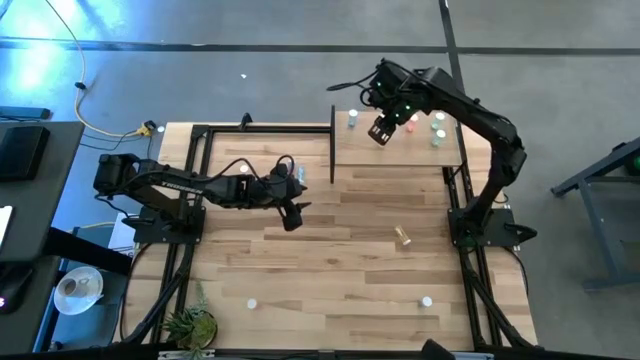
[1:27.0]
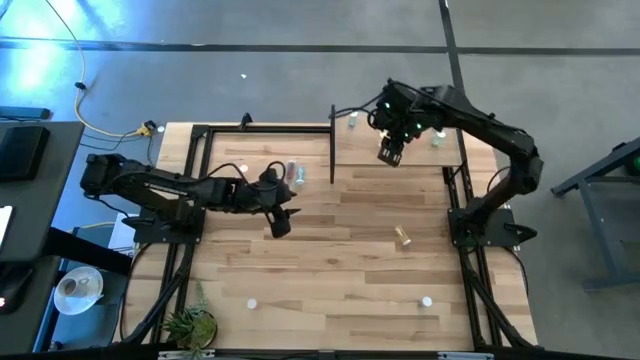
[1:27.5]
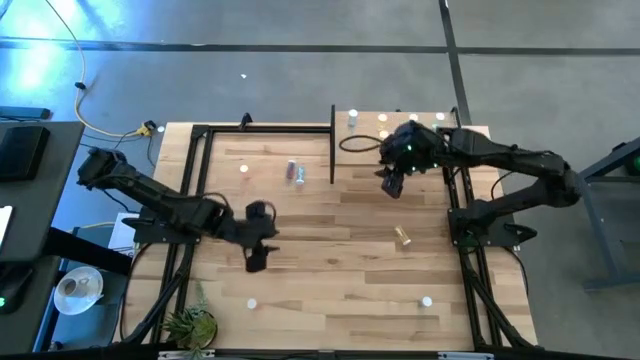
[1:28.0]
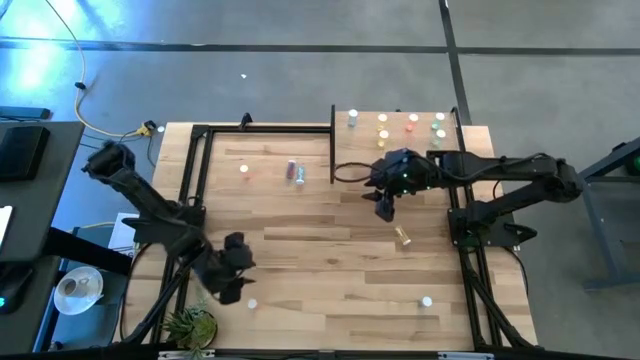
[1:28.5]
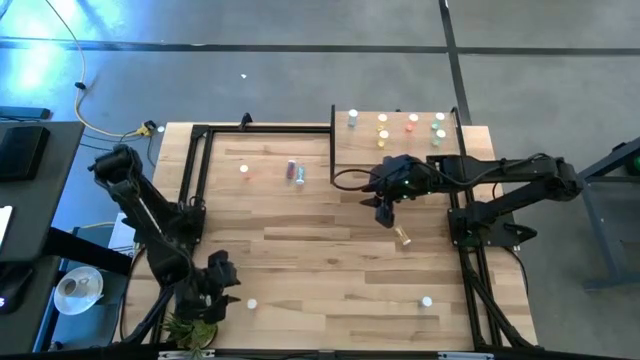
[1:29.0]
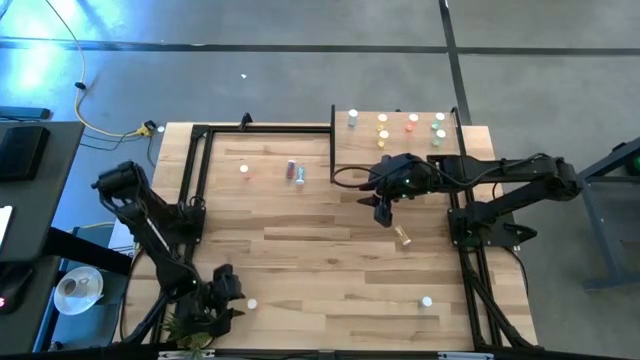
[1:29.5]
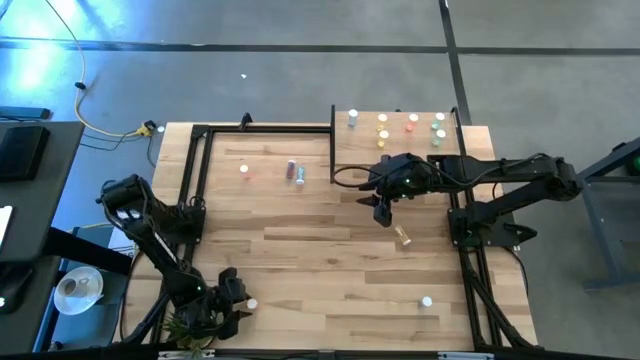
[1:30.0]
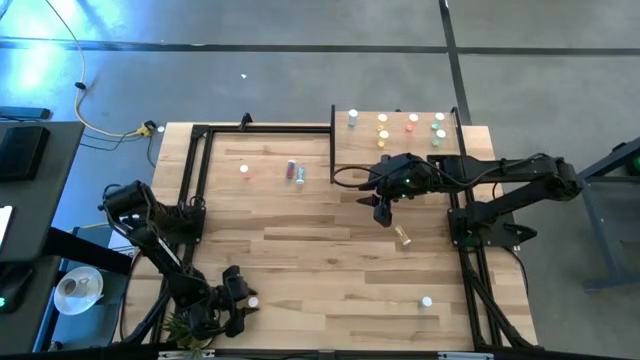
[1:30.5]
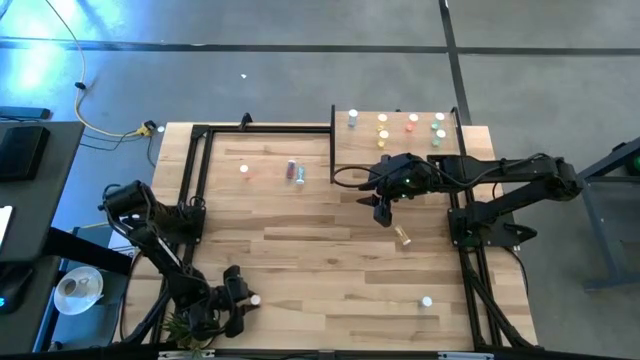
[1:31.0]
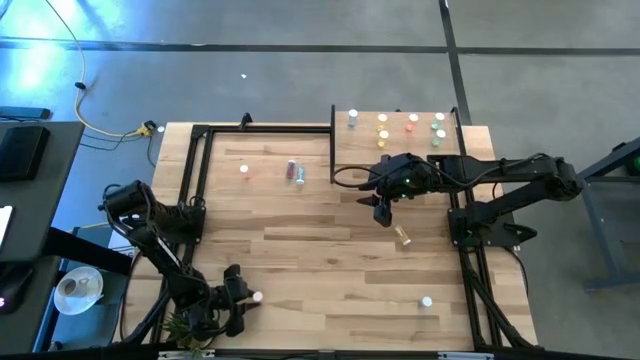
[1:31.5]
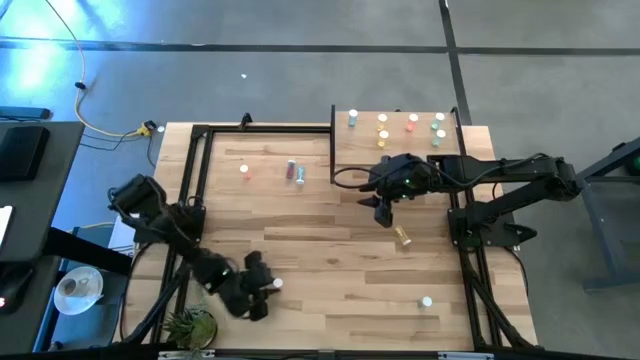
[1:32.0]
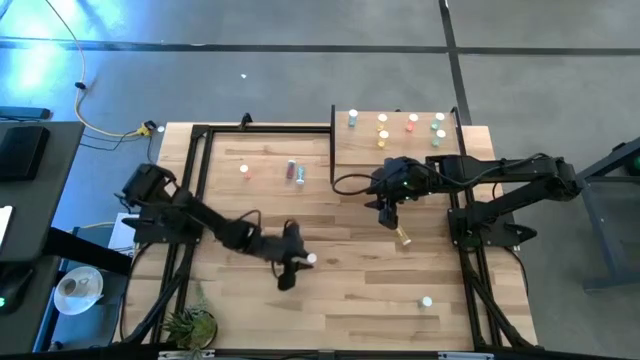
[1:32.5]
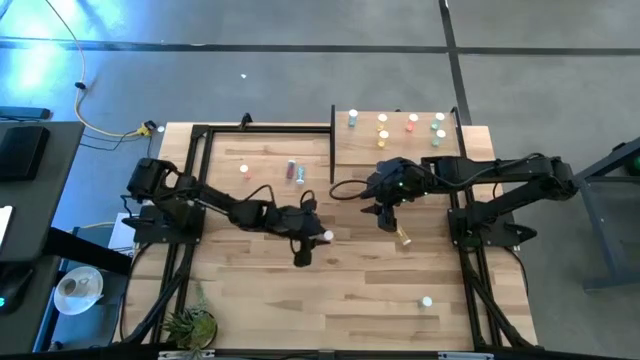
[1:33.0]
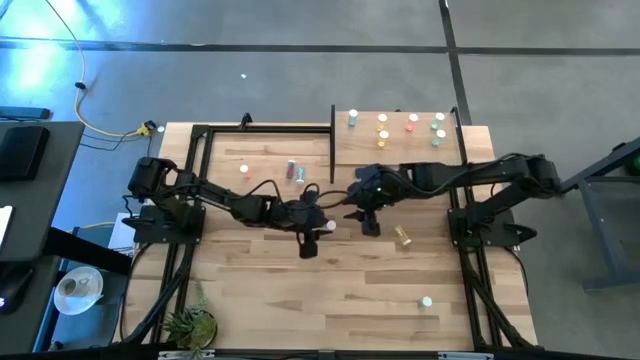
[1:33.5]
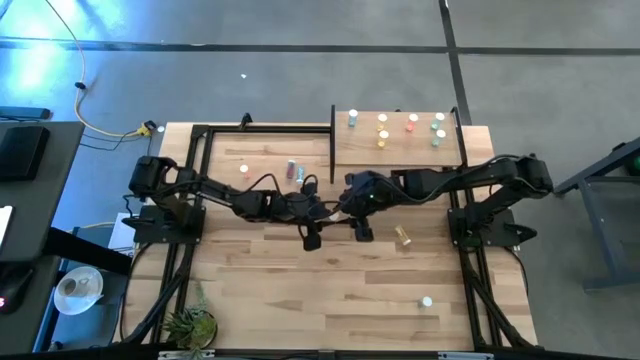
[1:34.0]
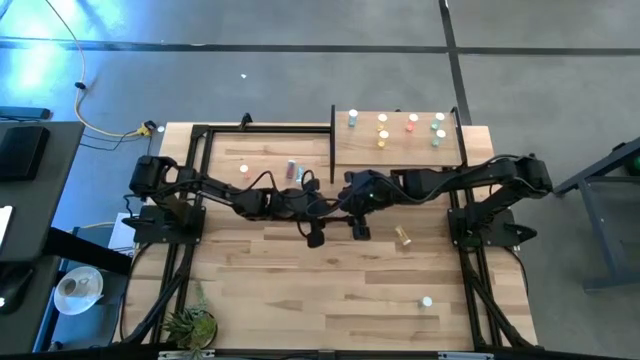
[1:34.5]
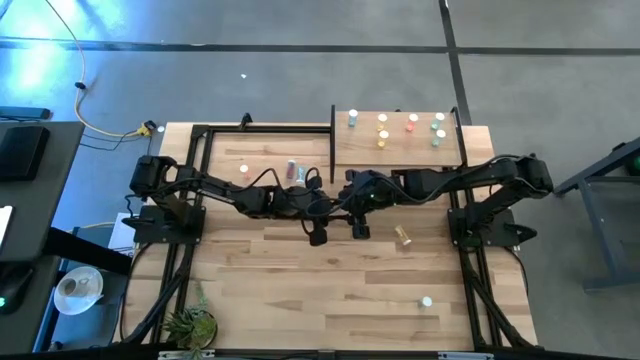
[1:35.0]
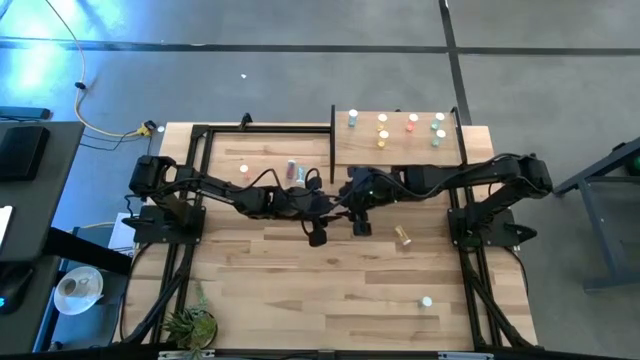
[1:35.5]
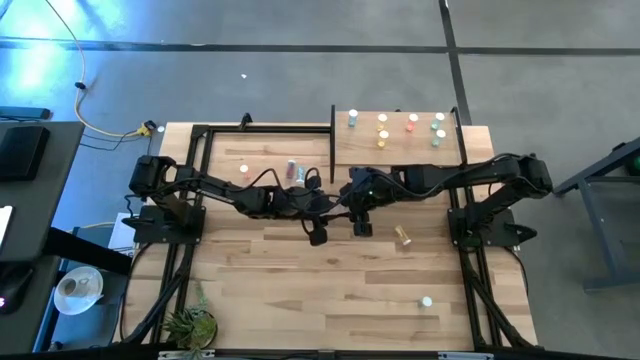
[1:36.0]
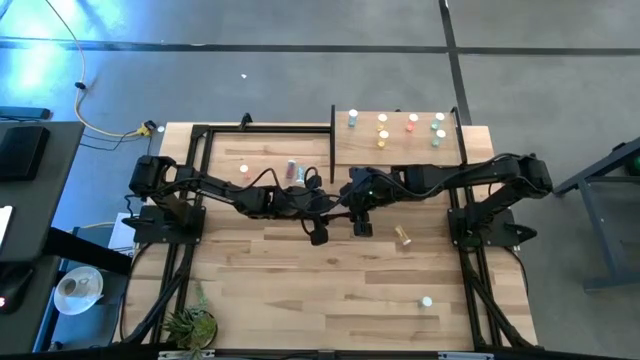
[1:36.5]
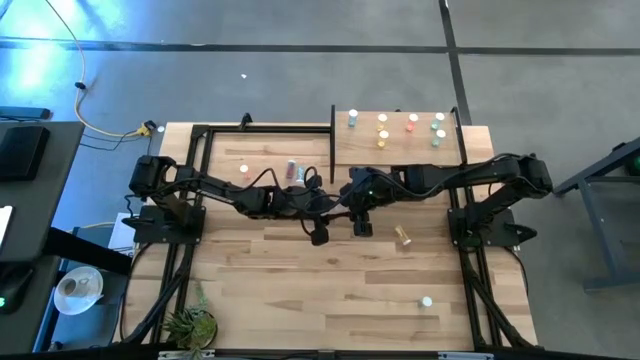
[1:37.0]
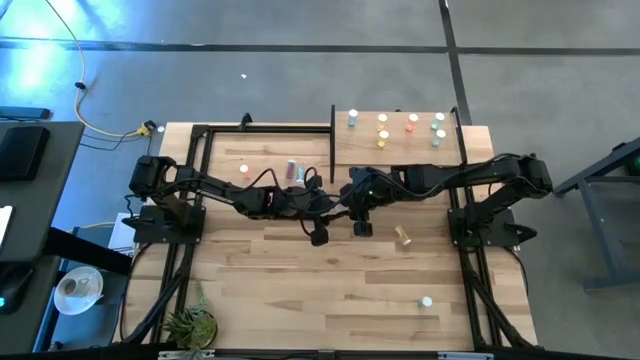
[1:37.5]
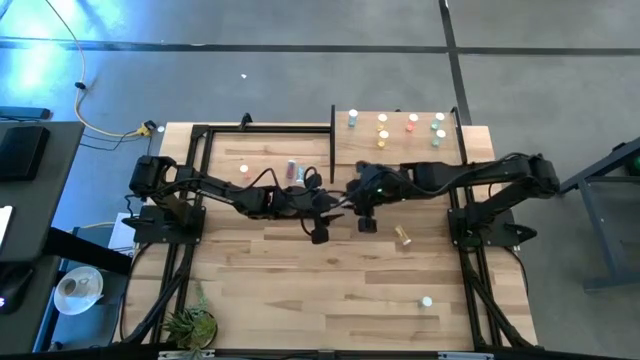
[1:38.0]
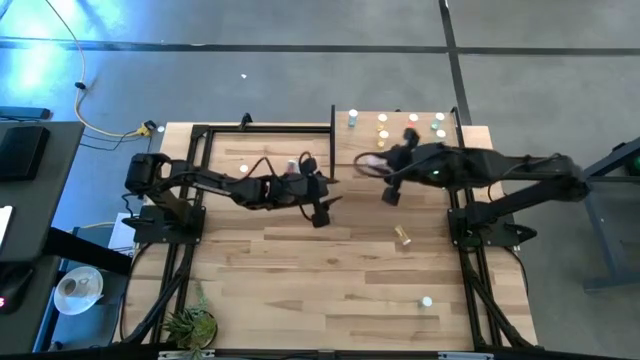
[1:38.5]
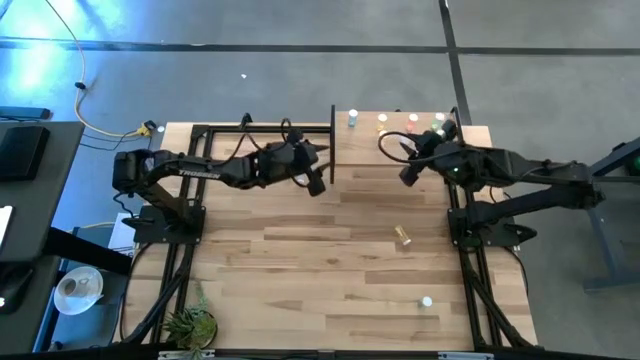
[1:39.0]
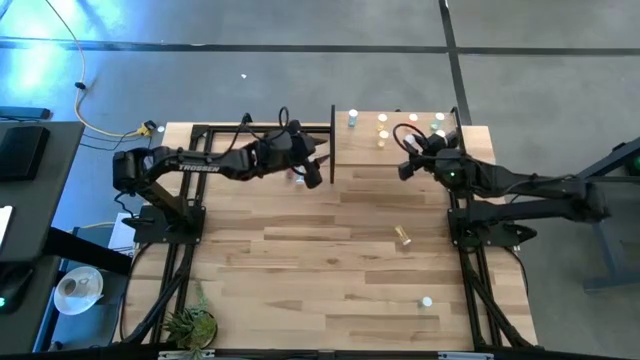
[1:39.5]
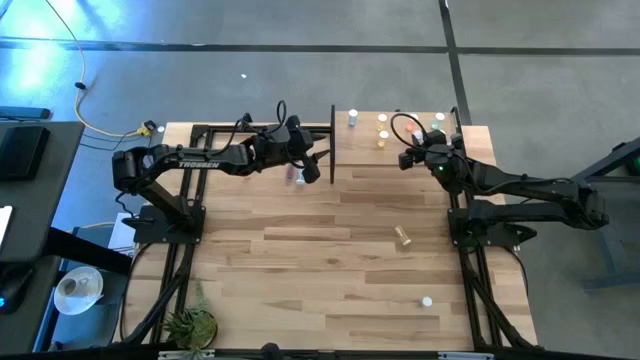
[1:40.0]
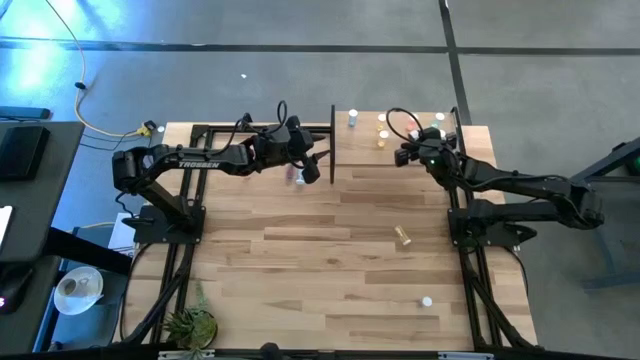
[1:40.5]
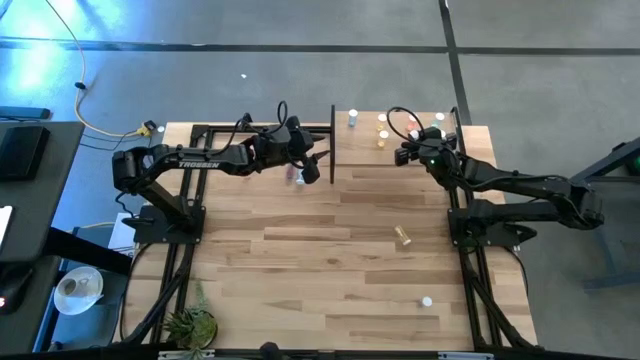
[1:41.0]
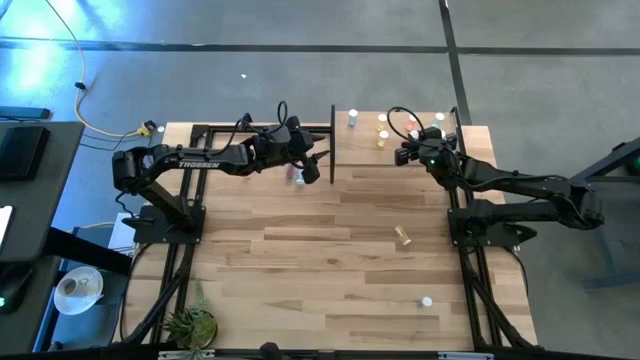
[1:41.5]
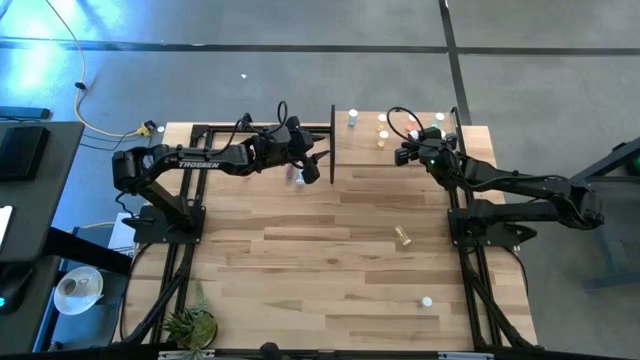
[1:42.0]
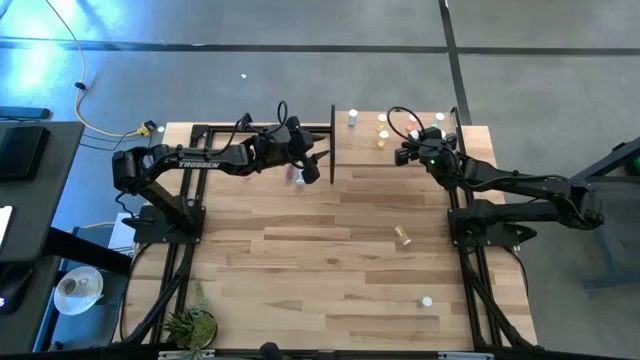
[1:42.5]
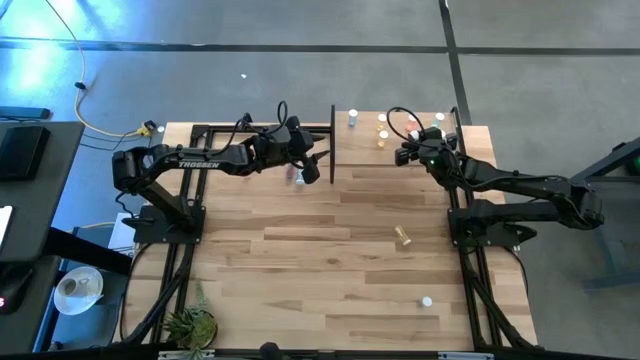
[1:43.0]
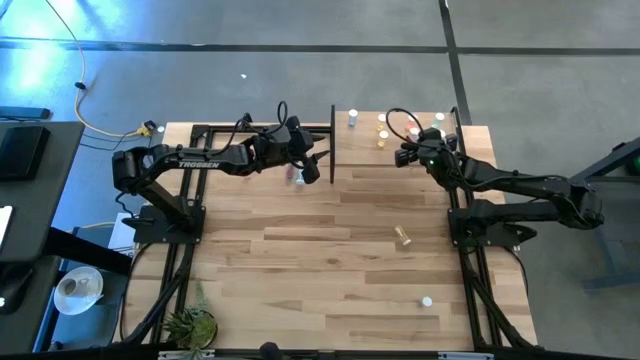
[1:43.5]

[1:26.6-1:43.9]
Task: Pick and place medicine bottles onto shelf by color
Put the bottom pink medicine bottle aligned with the other pink medicine bottle on the shelf

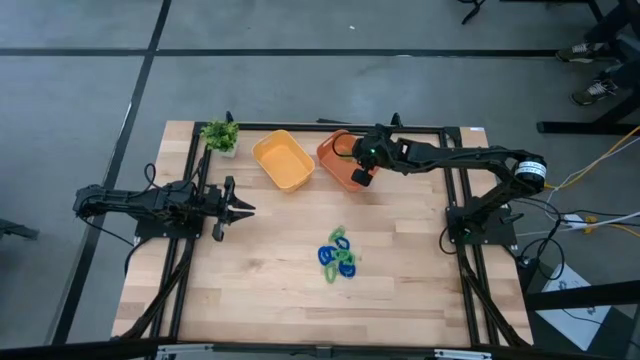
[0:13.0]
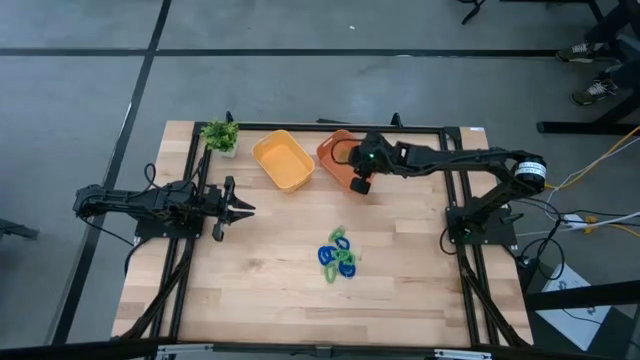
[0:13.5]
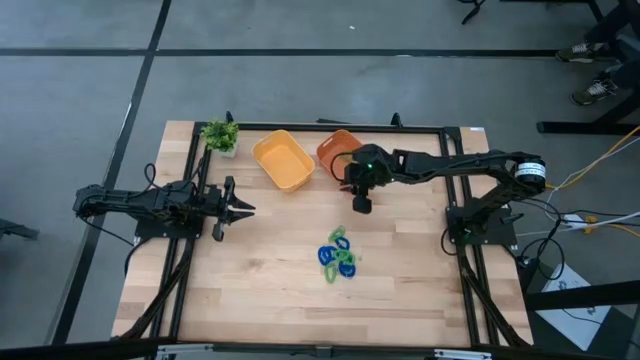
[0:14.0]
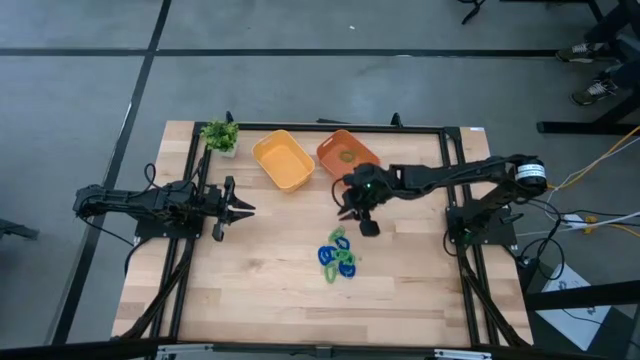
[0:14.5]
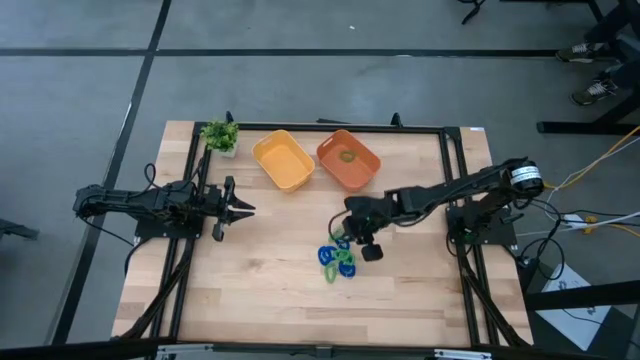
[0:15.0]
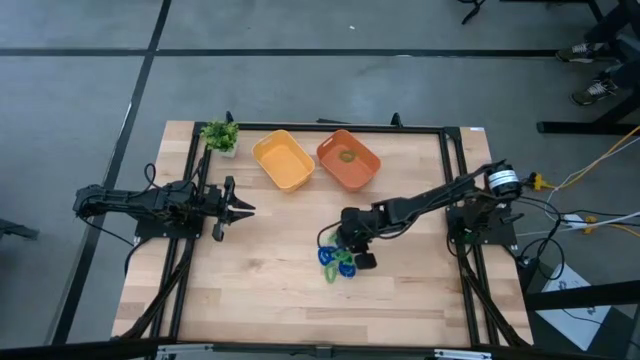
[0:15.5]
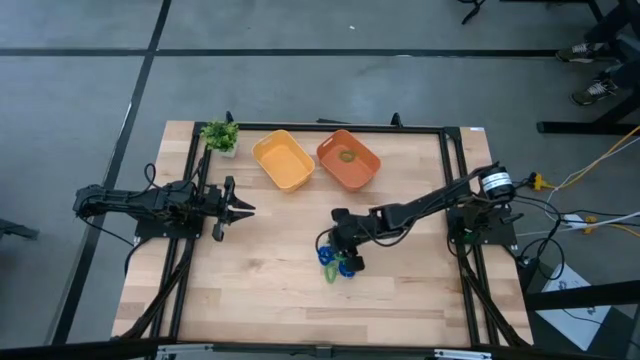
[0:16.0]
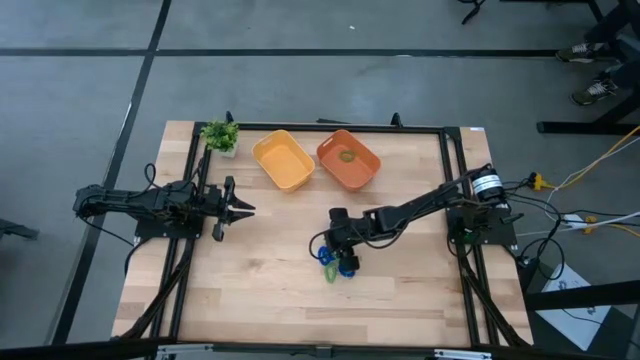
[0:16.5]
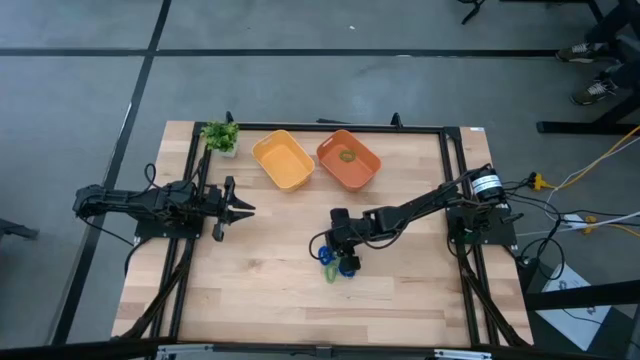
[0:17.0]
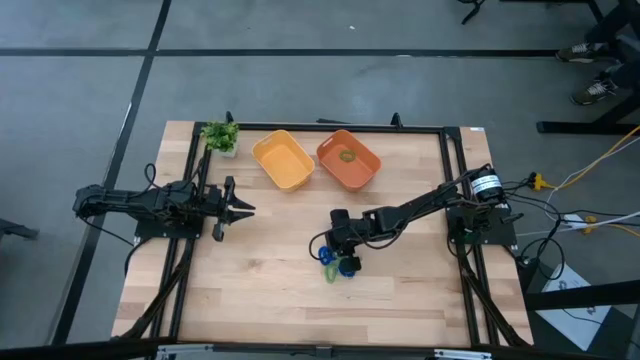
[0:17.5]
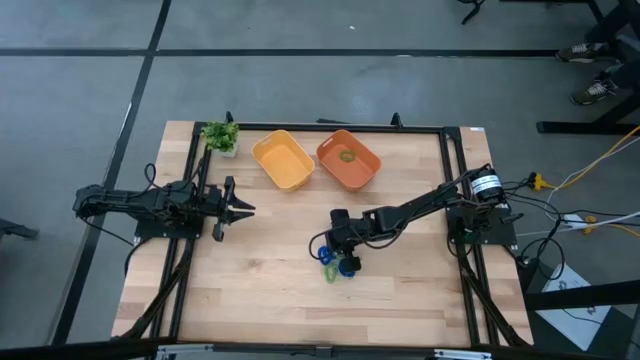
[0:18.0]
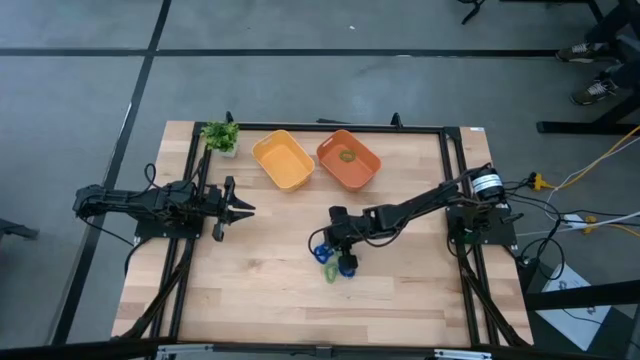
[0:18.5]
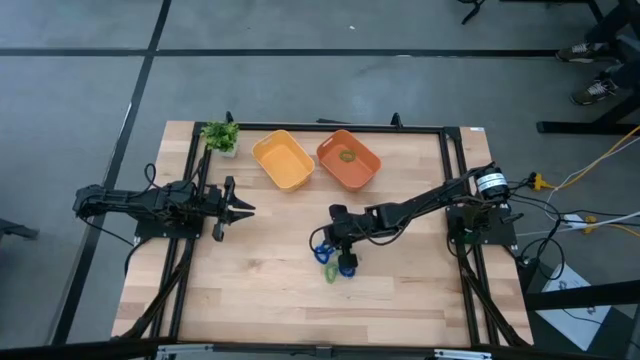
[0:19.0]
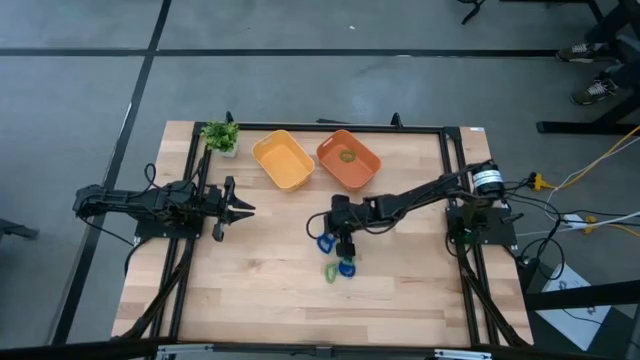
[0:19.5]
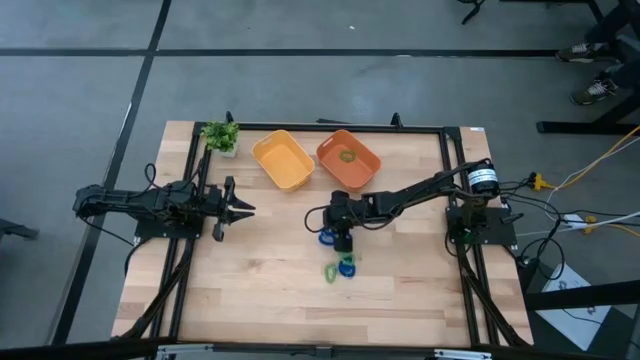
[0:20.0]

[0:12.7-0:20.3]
Task: Sort spring keychains
Put the blue spring keychain into the yellow bin
